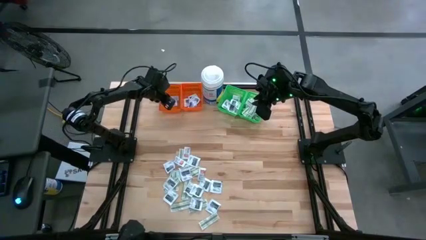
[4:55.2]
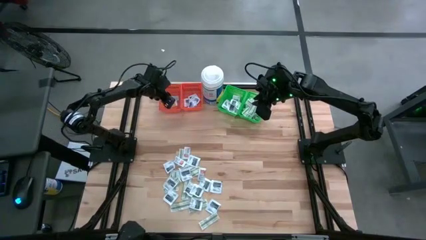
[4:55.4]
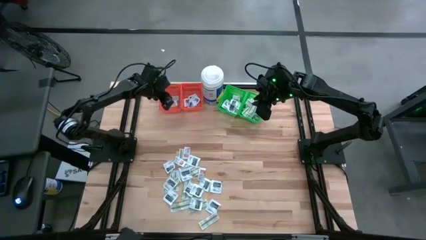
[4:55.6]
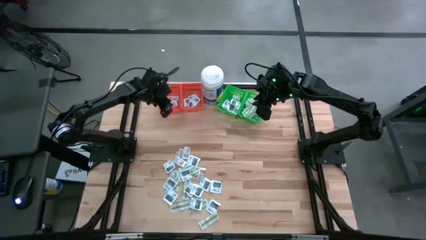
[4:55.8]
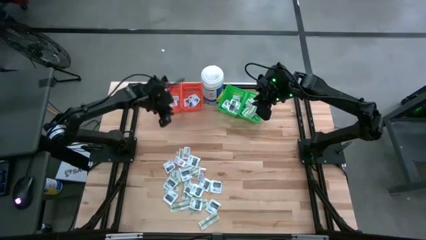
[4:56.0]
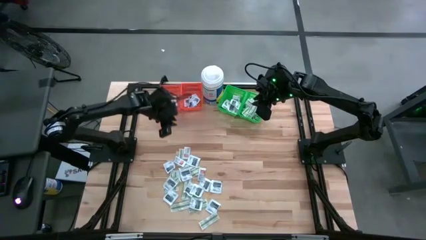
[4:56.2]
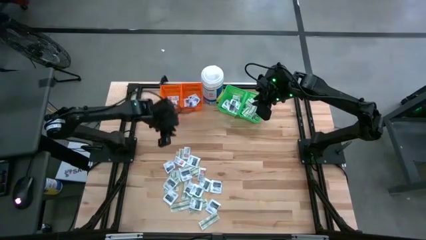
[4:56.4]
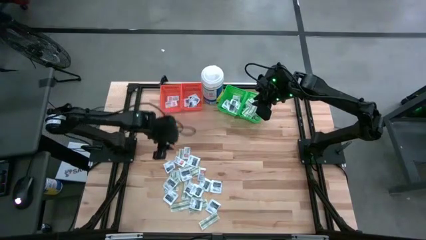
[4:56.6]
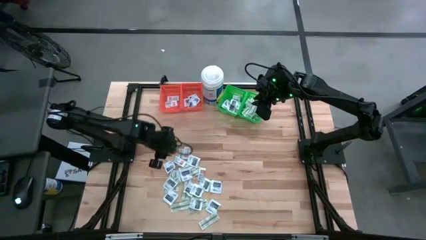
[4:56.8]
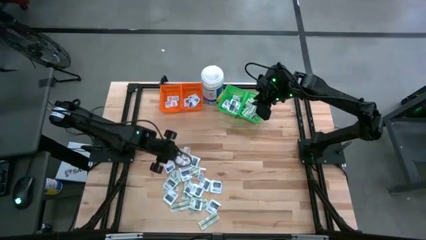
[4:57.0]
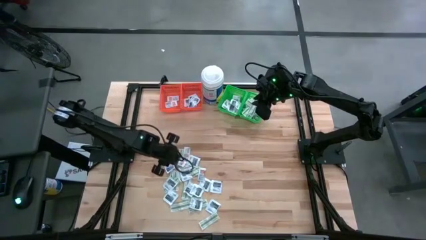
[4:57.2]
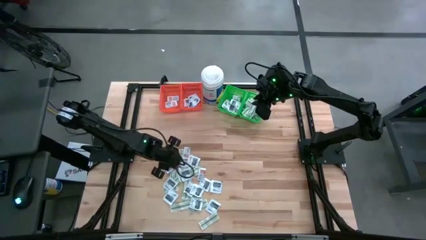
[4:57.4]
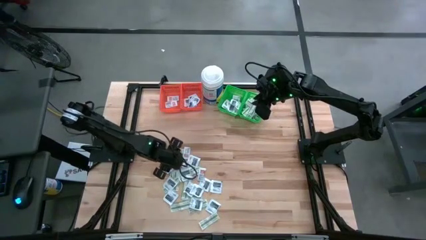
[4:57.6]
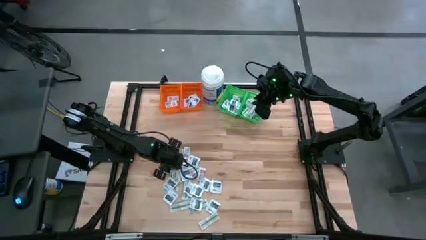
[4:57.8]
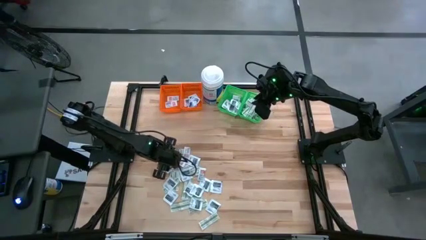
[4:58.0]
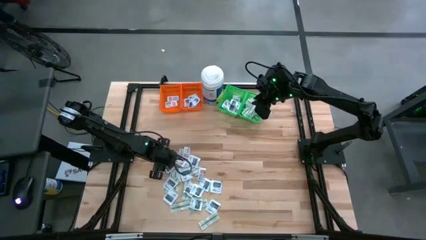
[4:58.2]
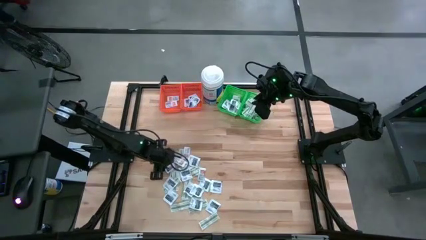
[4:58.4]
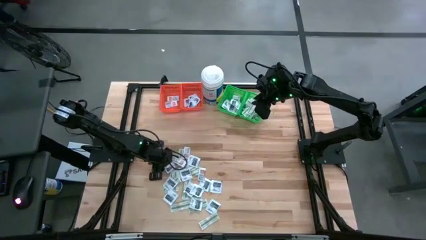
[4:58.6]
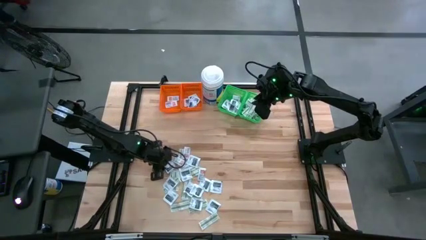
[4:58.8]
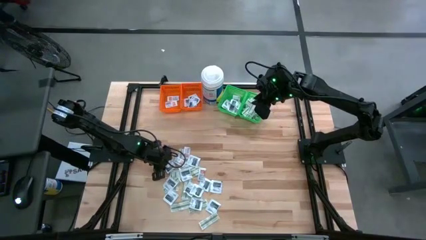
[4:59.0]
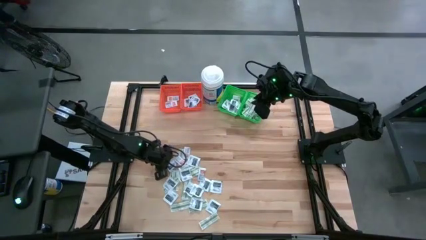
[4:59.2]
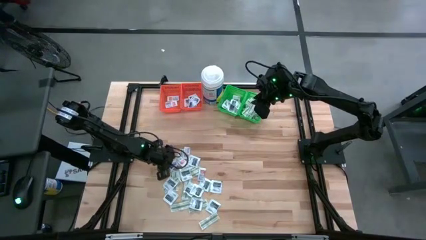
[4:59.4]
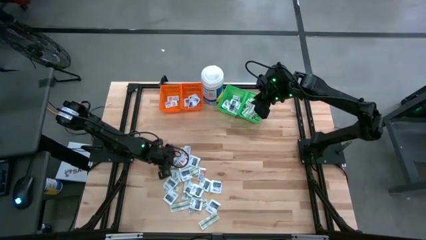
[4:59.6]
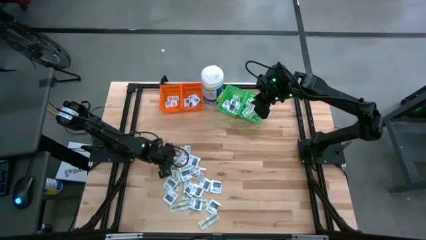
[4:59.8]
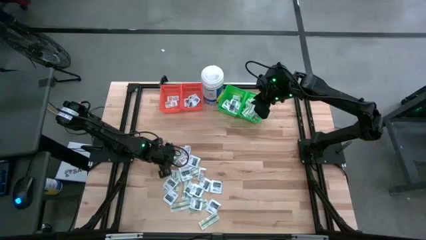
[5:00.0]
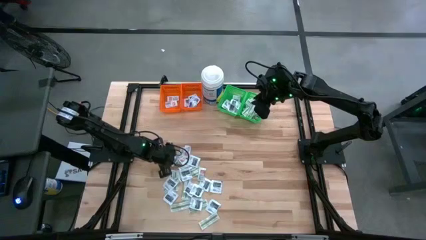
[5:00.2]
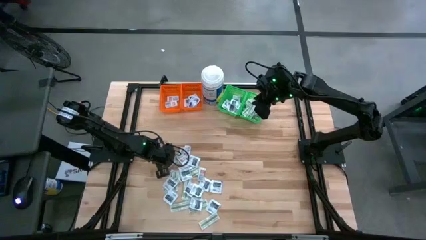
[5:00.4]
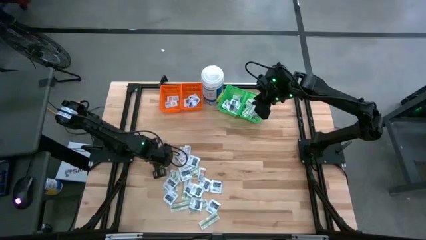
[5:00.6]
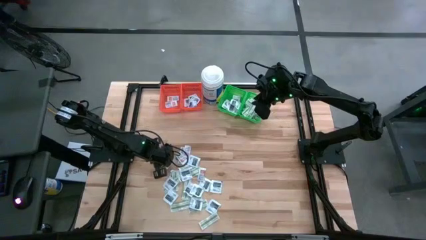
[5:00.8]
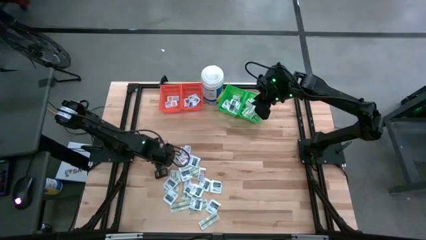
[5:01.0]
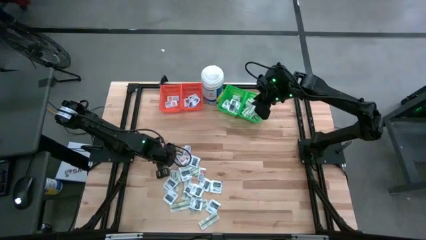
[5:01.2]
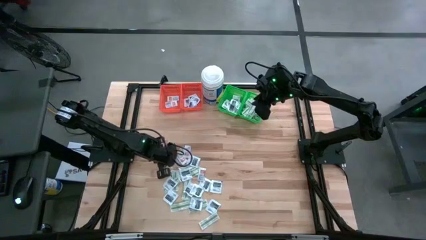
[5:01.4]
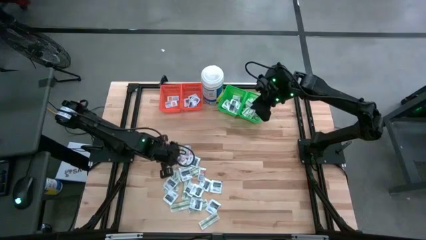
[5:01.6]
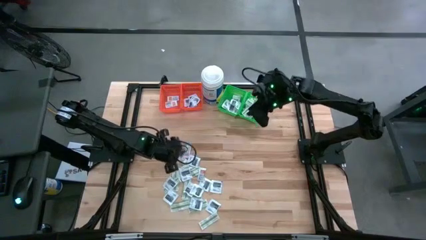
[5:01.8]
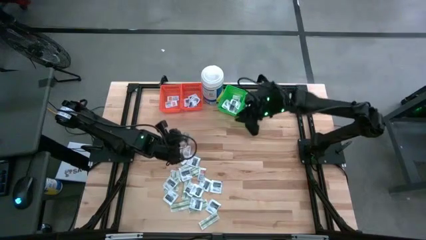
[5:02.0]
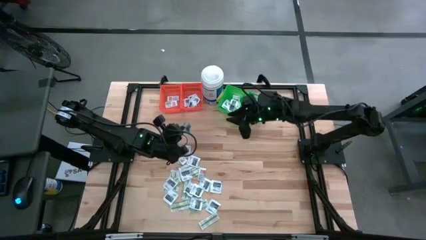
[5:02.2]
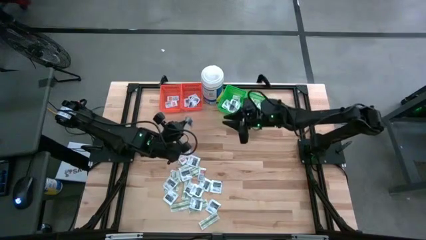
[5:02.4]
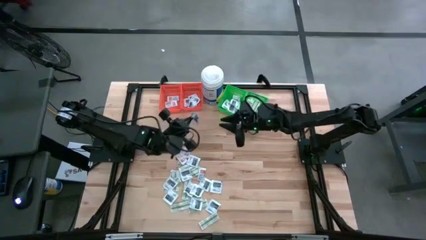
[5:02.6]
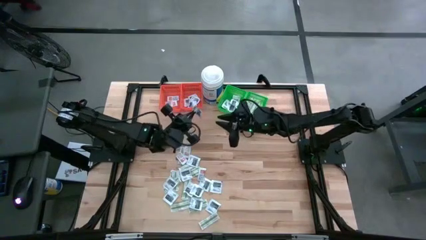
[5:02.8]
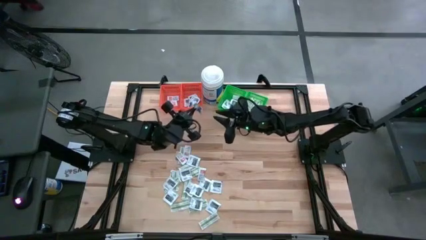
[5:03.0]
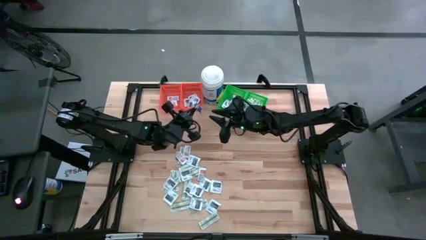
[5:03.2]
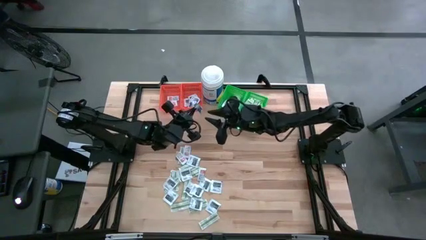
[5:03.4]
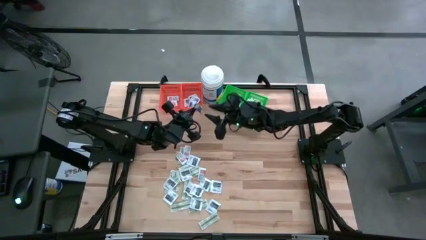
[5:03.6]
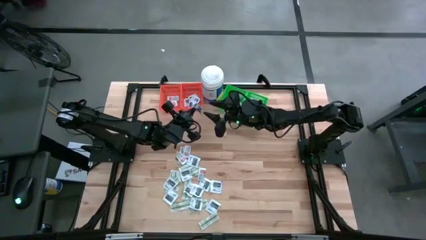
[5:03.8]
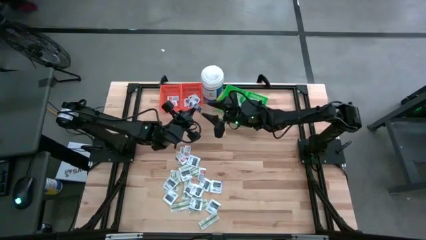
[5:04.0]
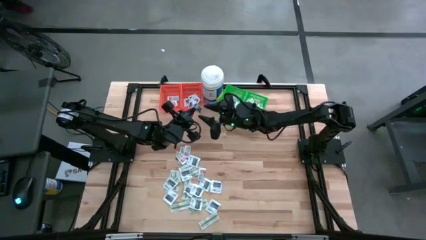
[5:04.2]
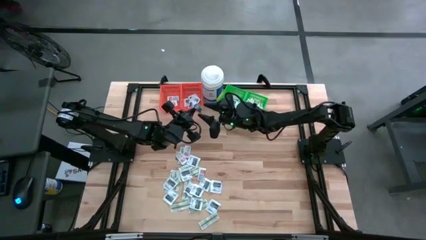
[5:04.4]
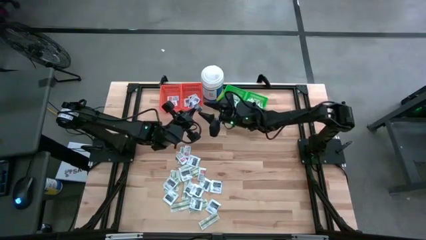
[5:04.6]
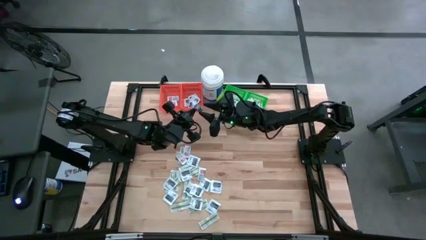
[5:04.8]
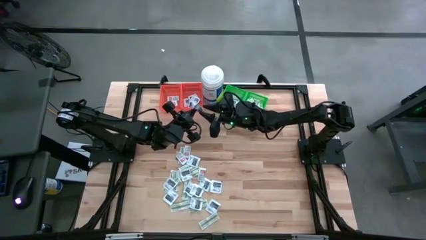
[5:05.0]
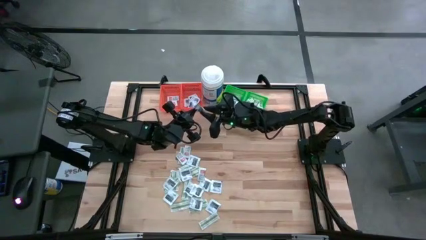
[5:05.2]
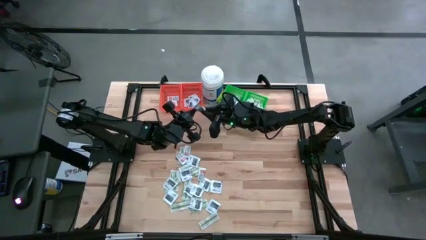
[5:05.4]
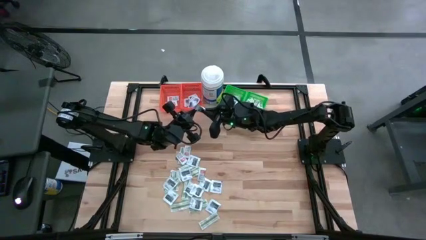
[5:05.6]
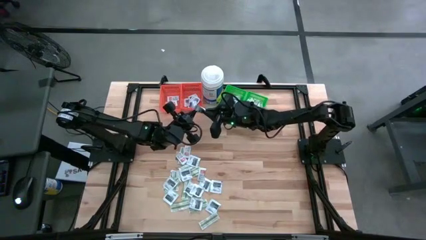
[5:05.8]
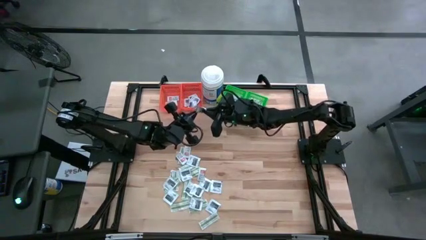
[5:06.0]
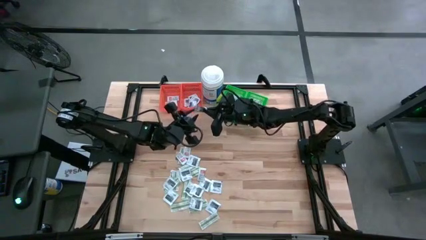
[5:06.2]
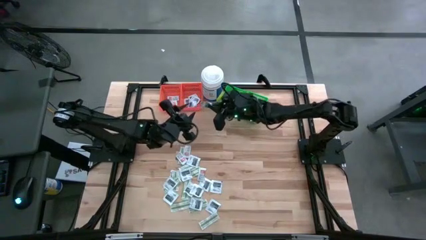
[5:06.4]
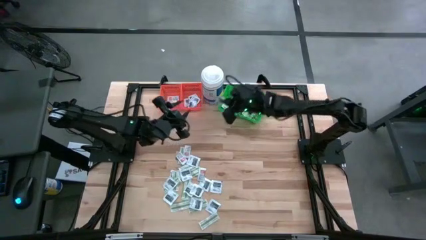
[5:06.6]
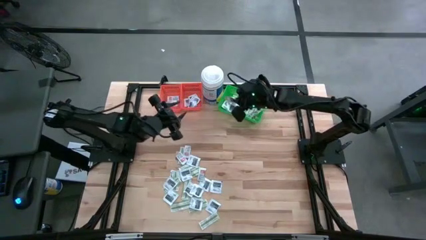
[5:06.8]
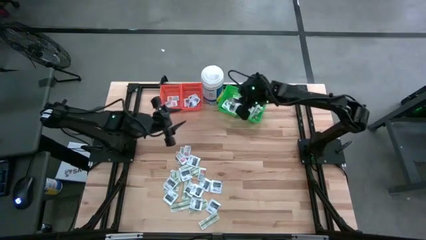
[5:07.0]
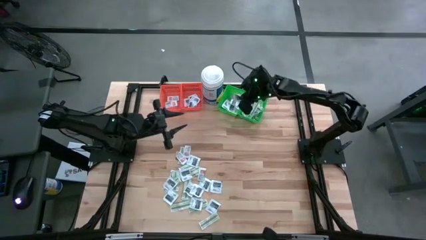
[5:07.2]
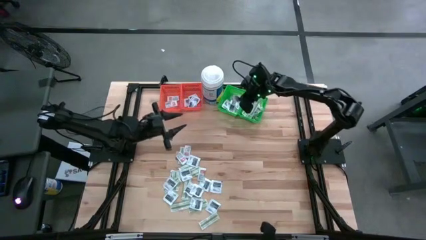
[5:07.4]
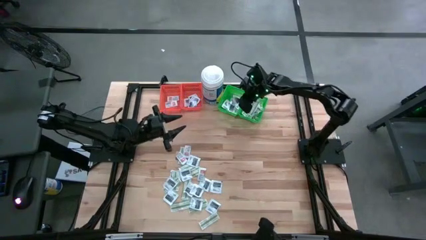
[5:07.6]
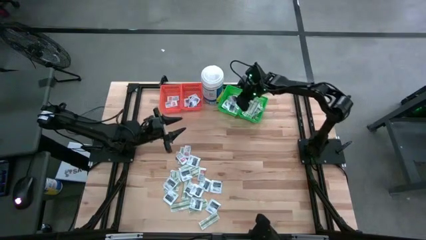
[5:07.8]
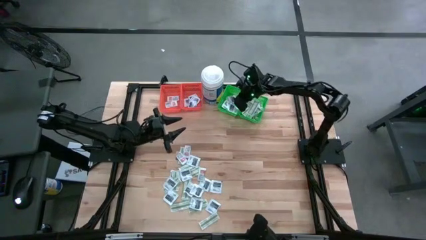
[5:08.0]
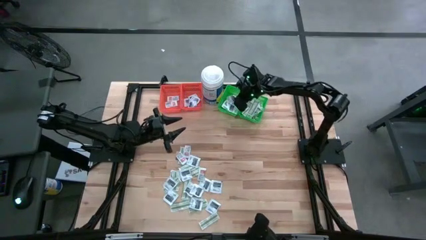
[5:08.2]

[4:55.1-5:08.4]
Task: Pick & Place First Aid Supplies
Put the black towelette pack into the left green bin
